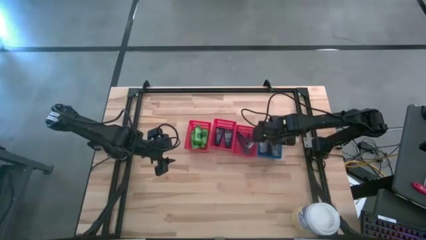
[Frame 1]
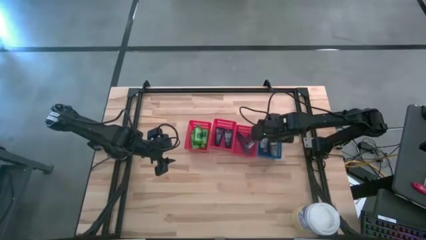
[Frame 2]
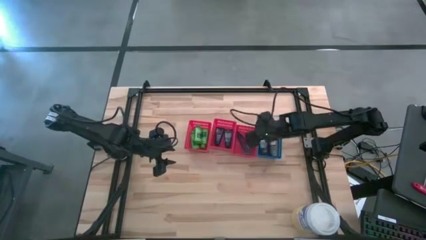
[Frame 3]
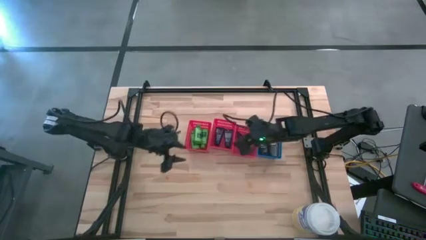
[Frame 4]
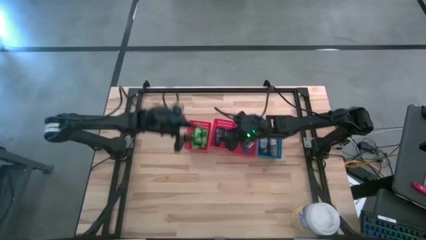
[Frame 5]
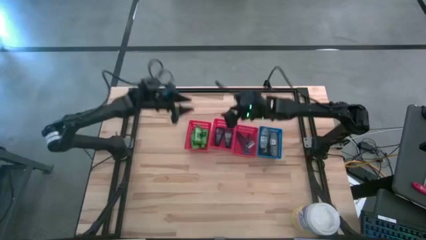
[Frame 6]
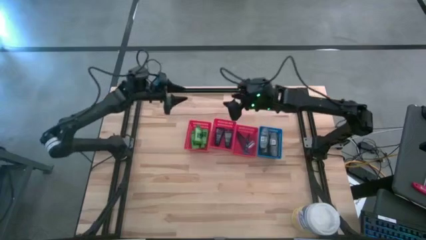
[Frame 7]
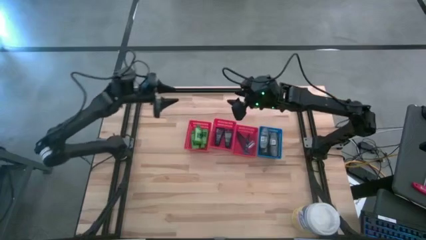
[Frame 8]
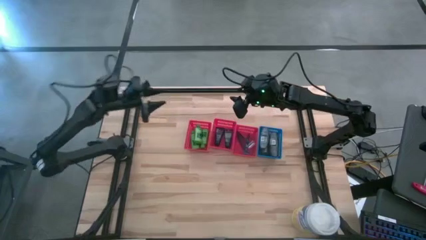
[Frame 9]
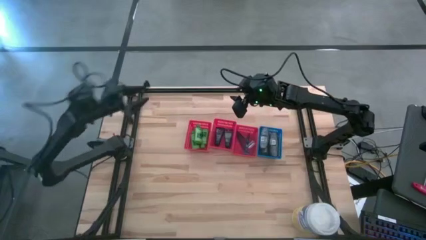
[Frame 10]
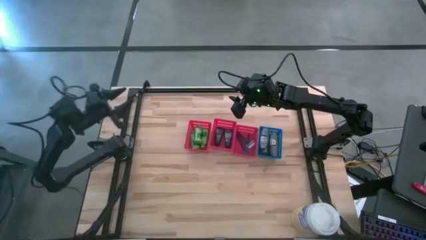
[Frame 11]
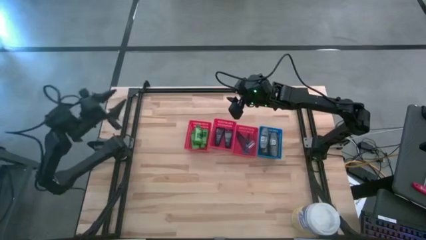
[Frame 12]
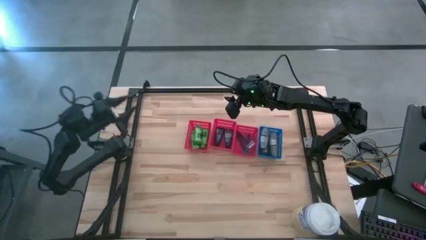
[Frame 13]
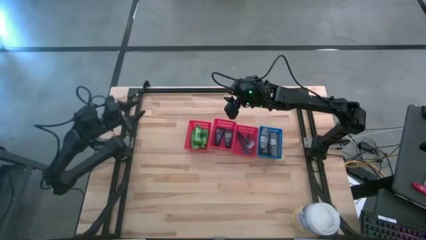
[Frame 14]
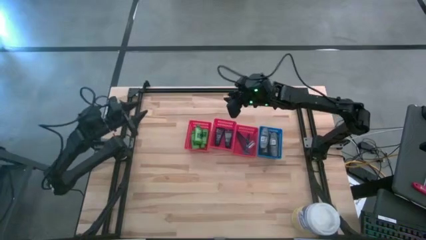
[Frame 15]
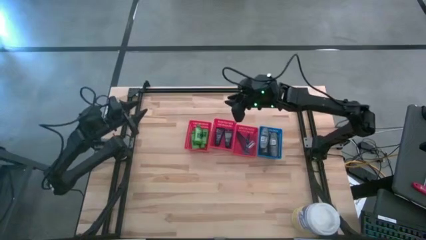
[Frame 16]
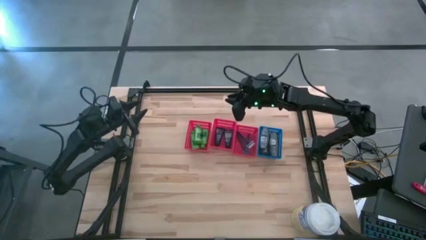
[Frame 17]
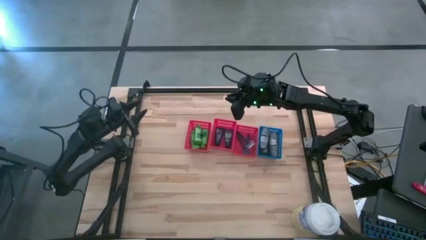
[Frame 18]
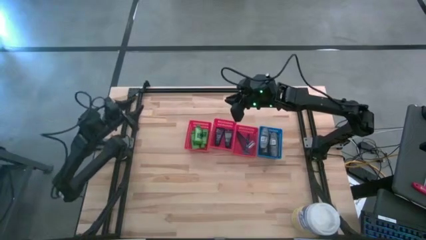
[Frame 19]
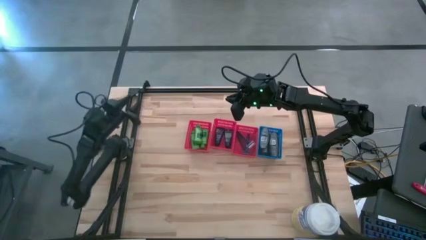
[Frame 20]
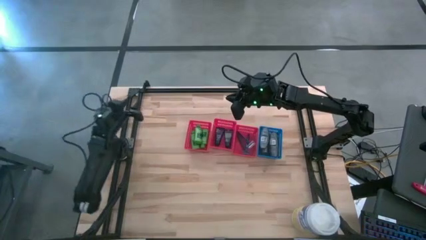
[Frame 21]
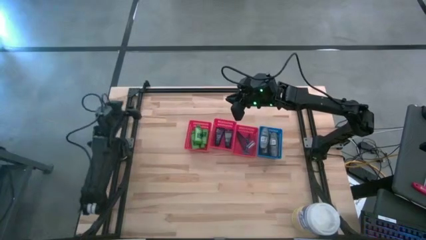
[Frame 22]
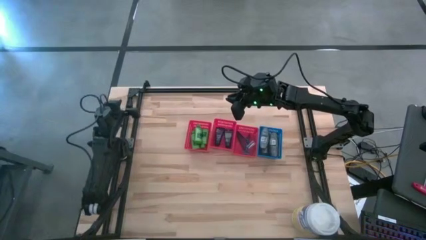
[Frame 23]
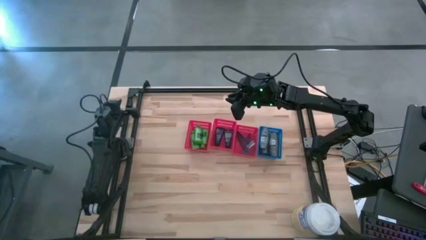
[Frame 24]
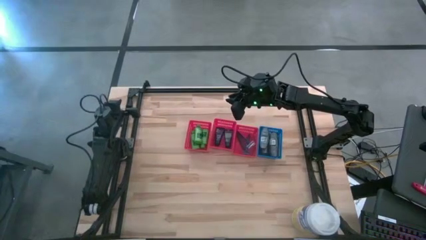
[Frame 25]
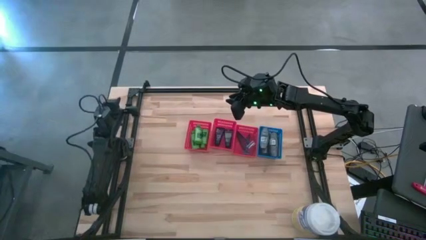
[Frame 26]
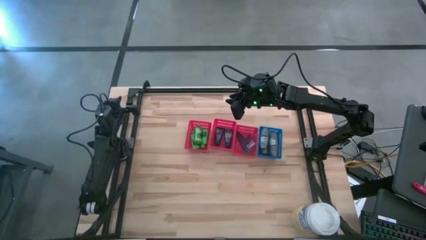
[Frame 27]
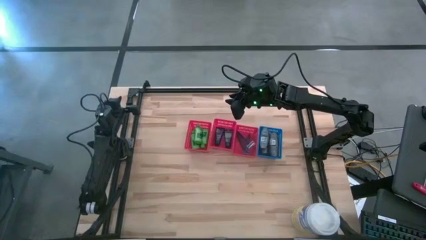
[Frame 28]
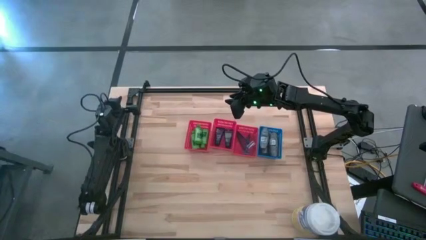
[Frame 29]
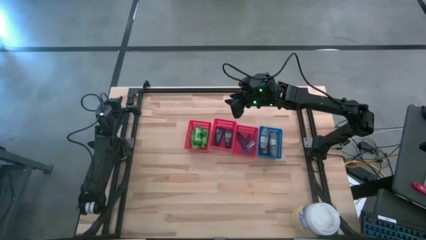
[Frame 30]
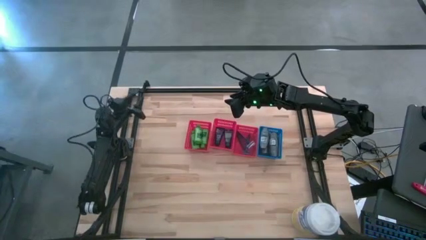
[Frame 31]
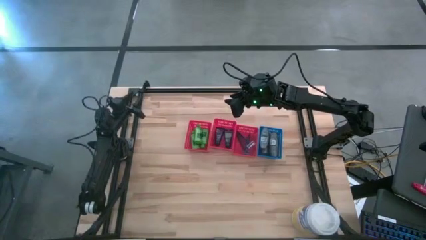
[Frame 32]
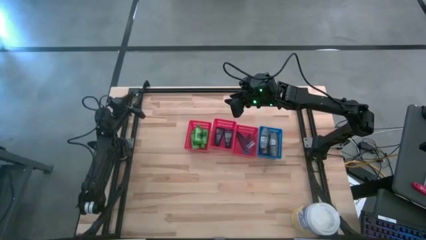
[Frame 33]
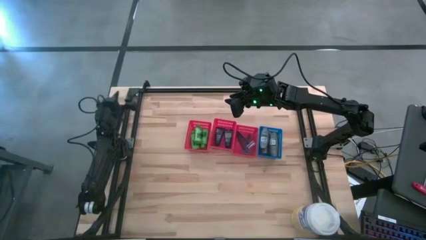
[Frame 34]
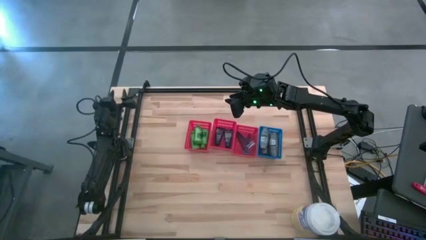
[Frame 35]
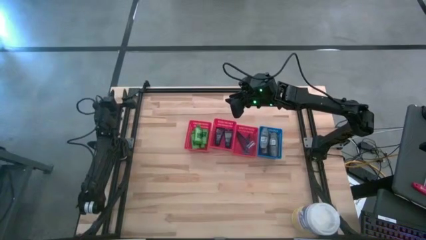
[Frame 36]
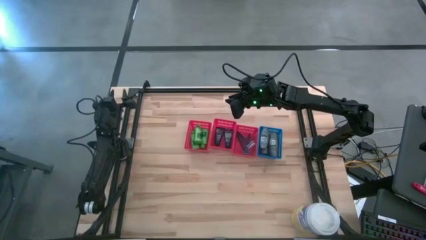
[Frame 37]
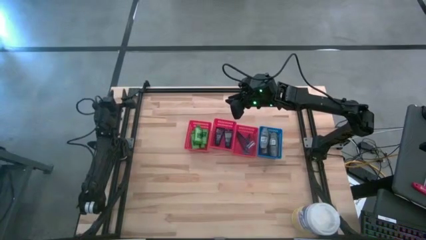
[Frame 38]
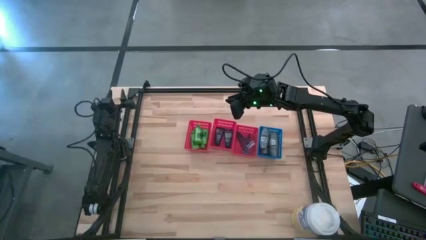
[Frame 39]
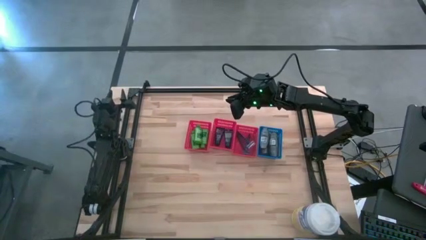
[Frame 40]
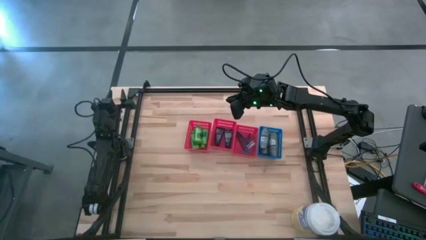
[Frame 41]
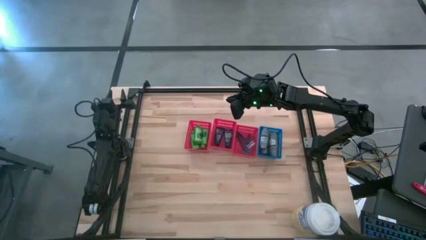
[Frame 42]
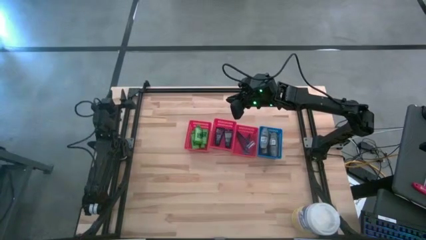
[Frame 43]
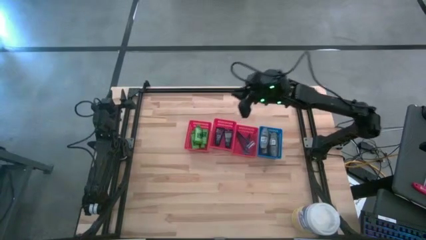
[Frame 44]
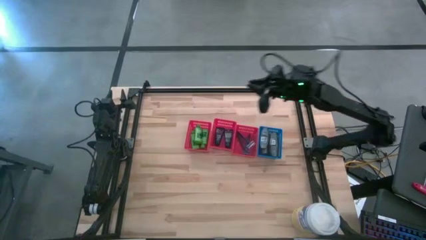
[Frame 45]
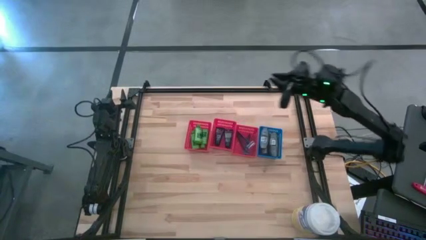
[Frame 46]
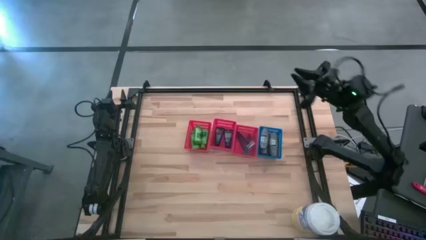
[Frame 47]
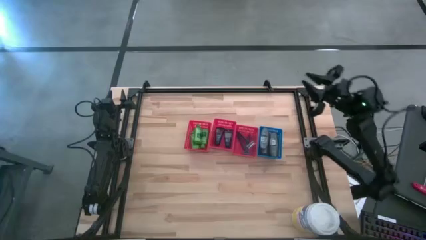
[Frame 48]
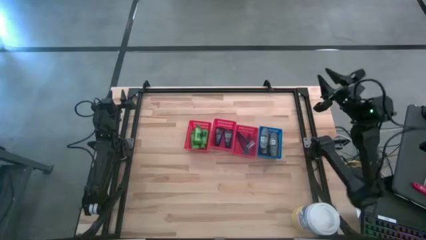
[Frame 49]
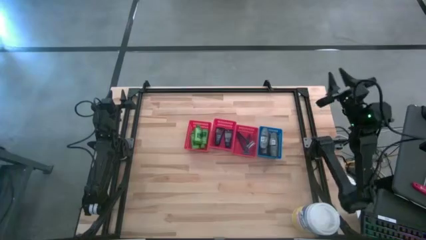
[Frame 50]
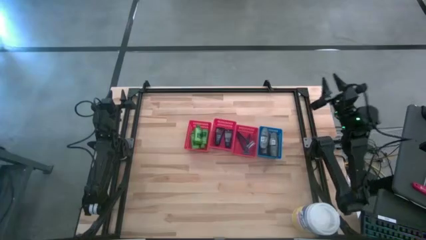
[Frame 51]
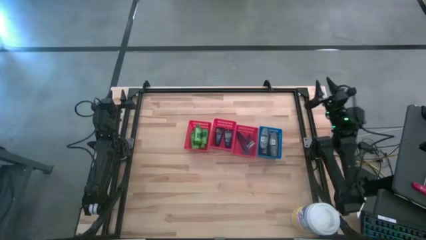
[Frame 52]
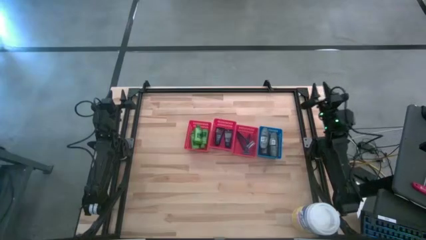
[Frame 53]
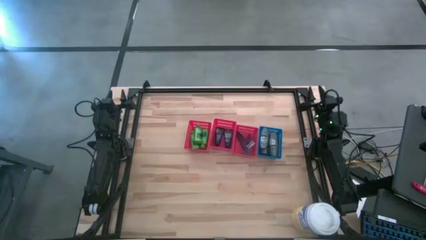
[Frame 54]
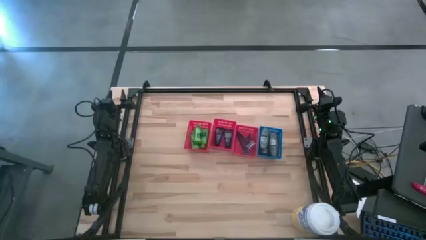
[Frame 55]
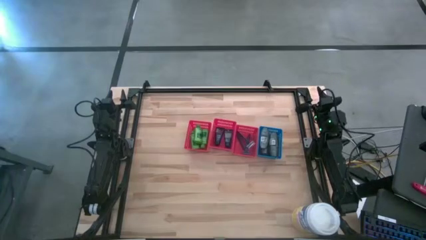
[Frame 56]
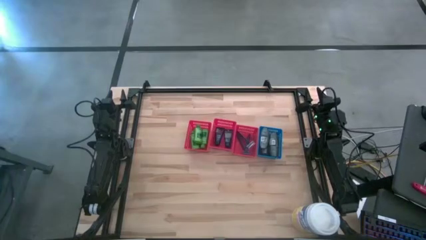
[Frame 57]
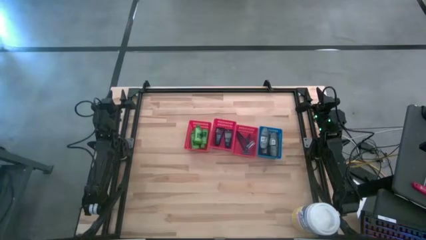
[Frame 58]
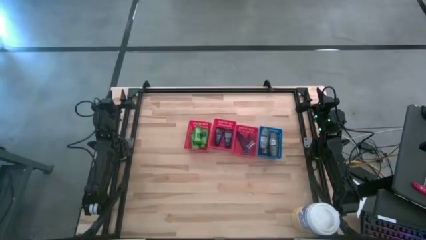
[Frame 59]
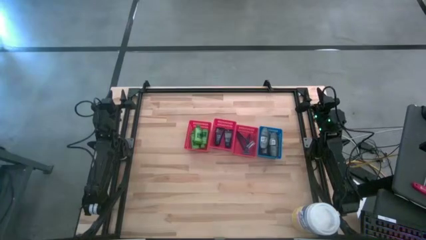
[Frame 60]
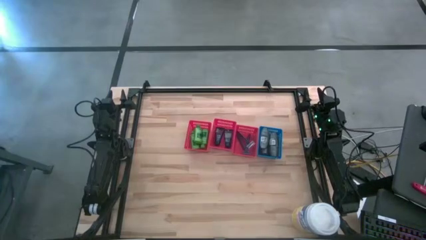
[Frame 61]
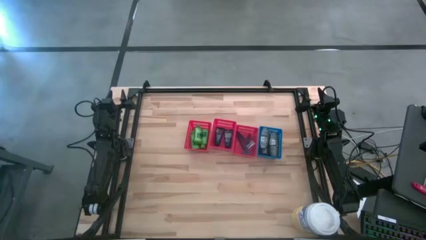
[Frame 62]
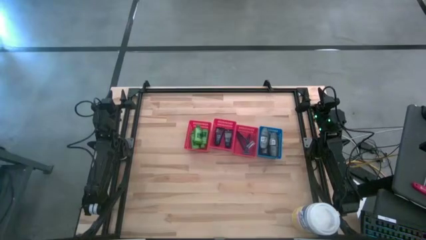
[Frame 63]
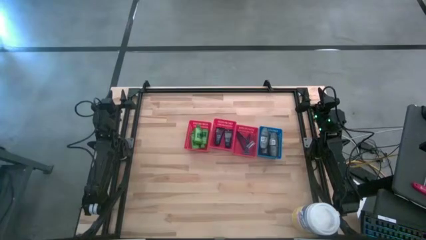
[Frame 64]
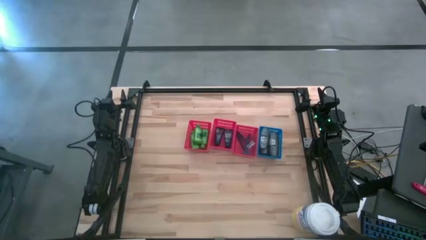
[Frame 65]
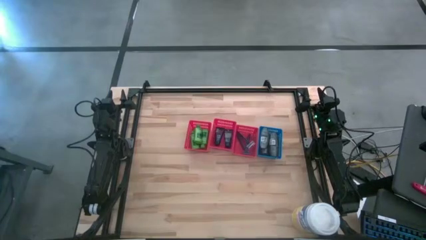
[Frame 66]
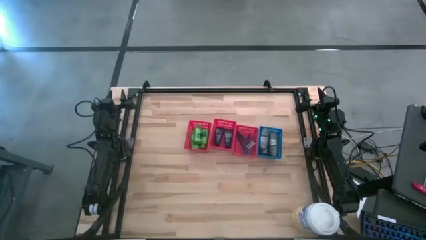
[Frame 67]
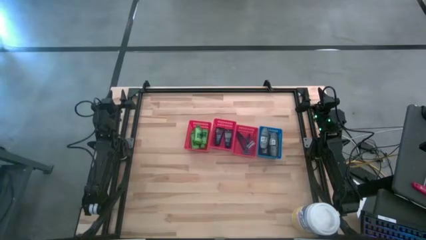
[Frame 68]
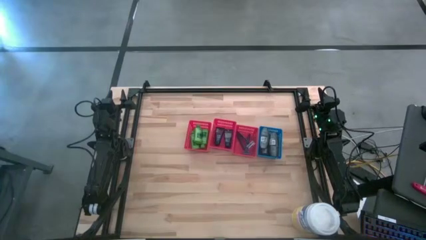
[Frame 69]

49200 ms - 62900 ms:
Task: Pick & Place Travel size toiletries
Return to Home Position

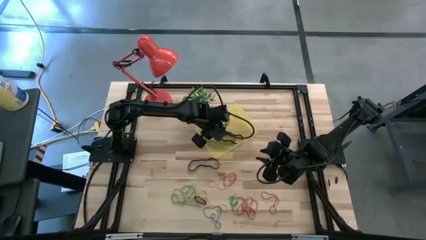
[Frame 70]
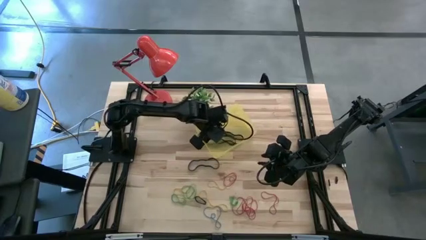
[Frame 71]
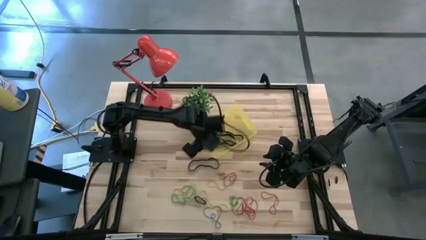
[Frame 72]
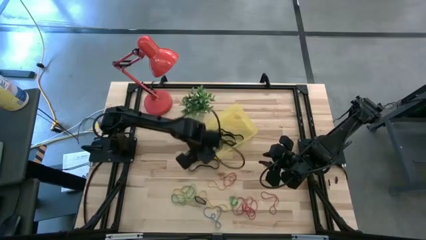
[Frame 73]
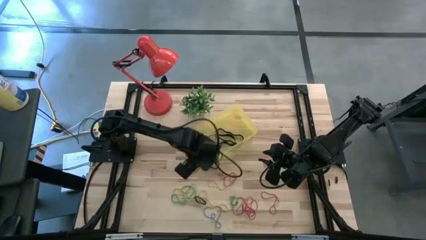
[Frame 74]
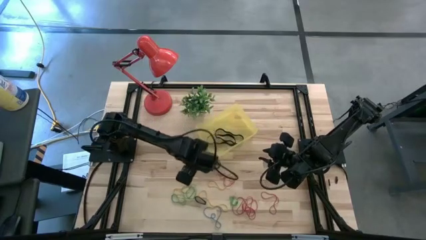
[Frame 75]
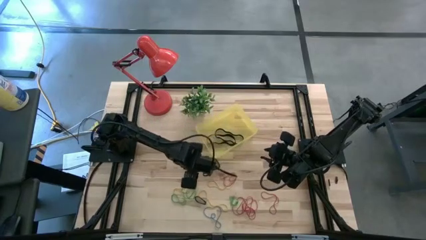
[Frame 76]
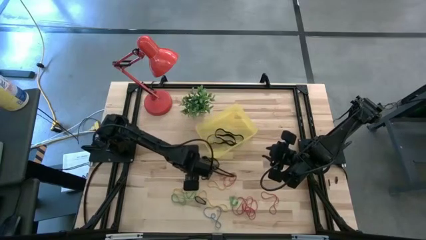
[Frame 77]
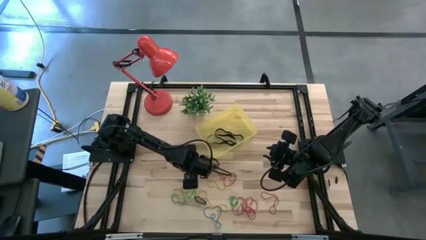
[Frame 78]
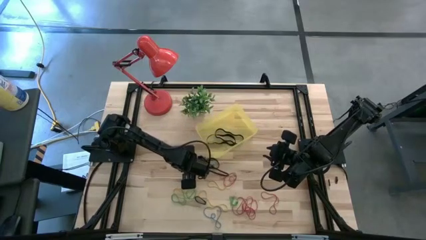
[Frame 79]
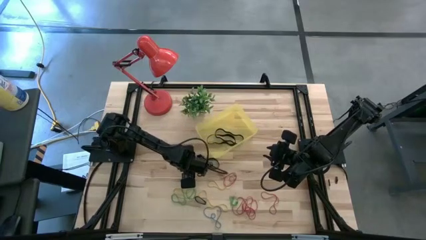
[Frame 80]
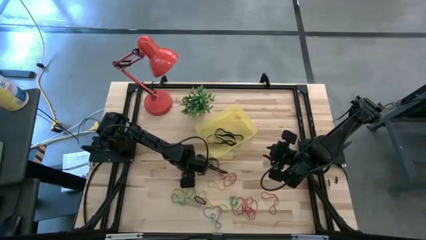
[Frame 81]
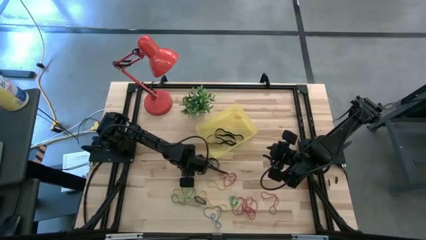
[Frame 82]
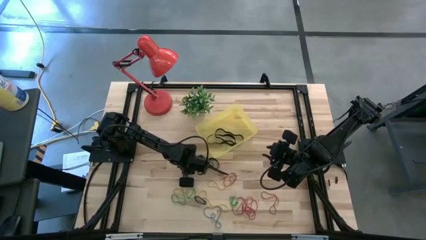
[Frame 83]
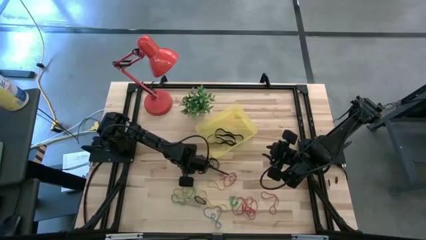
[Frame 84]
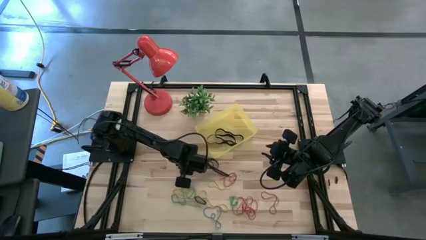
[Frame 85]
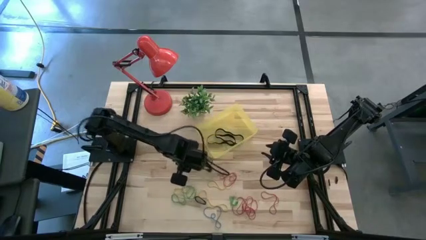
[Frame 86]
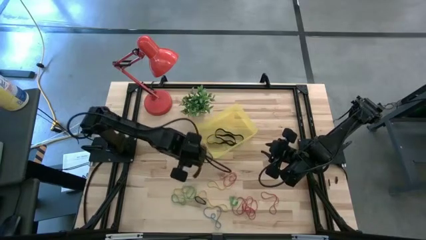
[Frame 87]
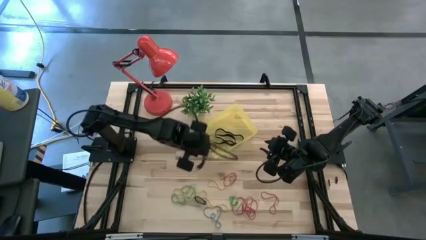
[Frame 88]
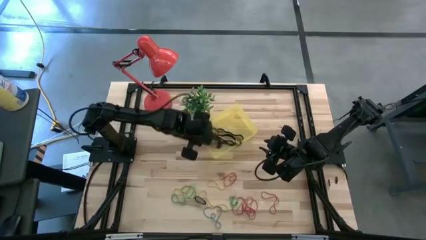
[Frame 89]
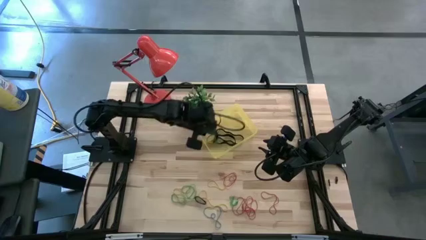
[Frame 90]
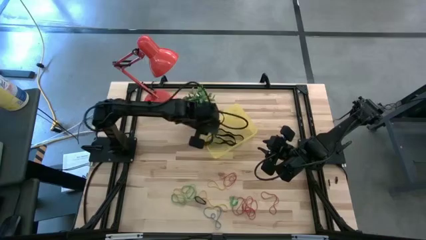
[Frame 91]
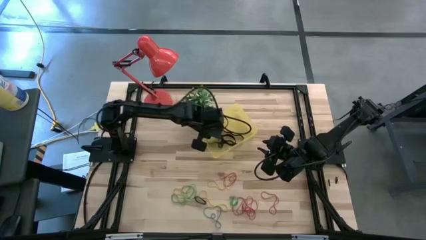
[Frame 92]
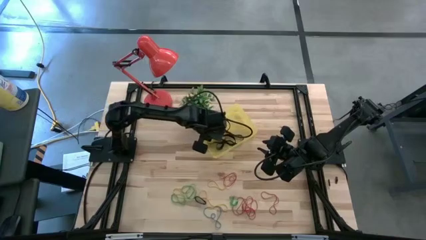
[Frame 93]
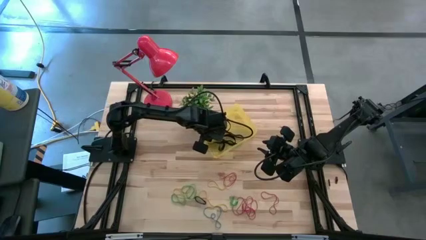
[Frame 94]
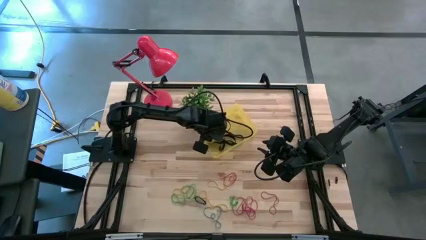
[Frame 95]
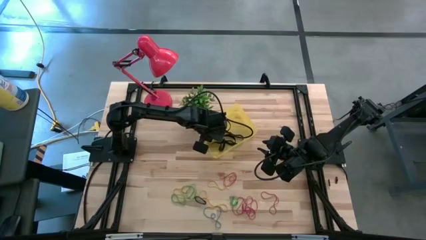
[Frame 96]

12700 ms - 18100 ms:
Task: Pick and place rubber bands into bin
Put the black rubber band into the transparent yellow bin
